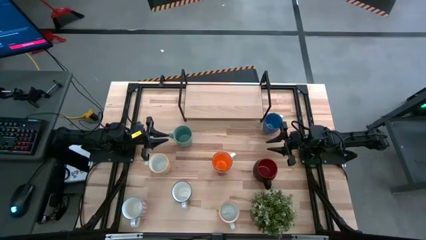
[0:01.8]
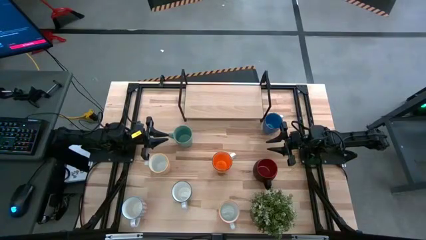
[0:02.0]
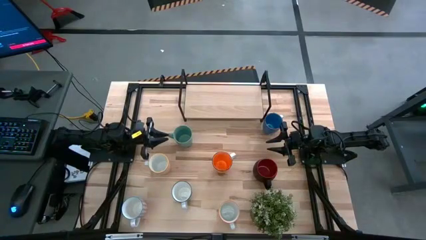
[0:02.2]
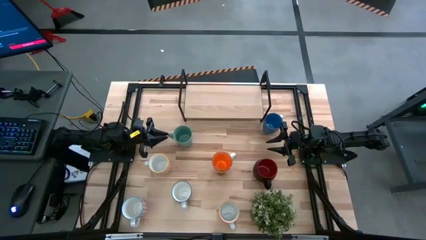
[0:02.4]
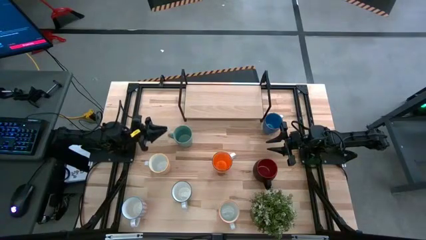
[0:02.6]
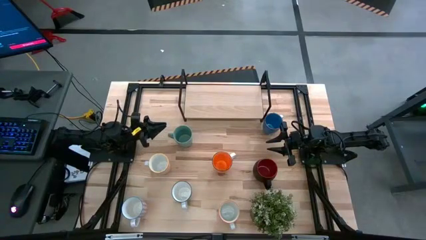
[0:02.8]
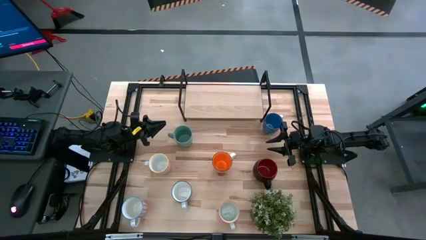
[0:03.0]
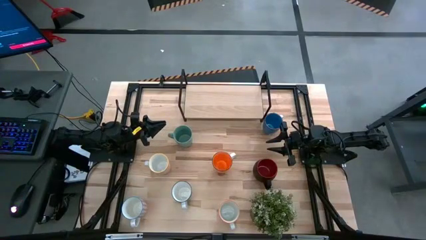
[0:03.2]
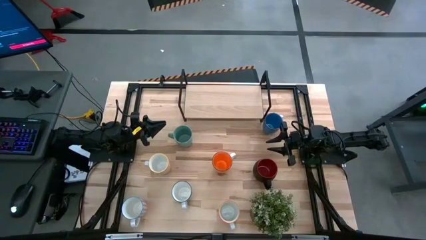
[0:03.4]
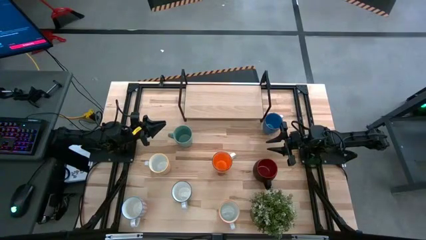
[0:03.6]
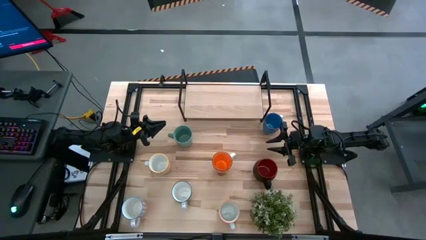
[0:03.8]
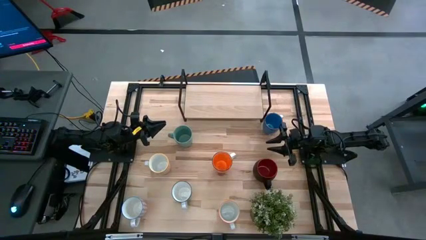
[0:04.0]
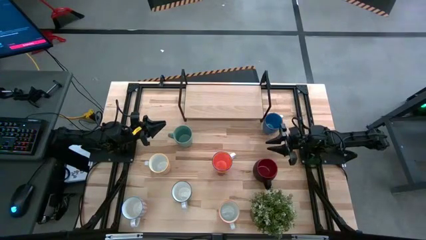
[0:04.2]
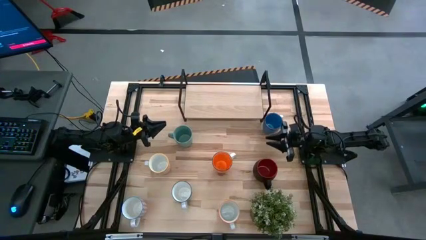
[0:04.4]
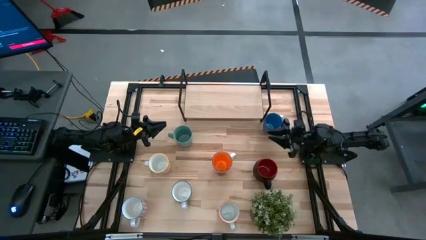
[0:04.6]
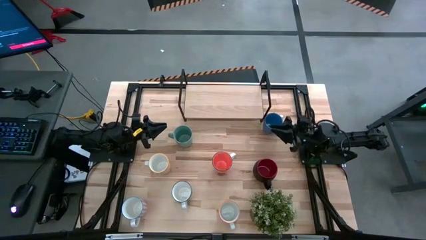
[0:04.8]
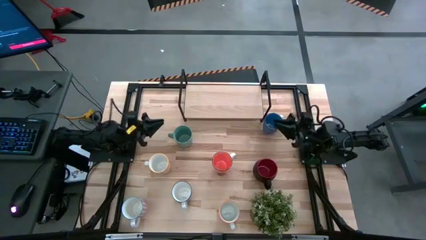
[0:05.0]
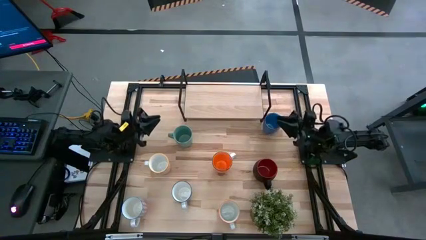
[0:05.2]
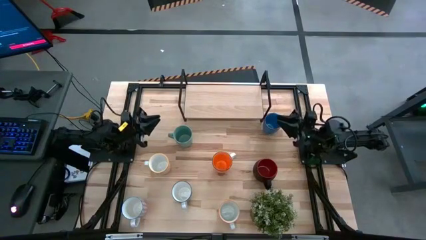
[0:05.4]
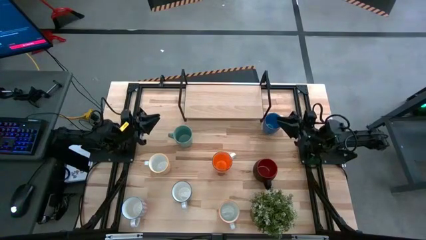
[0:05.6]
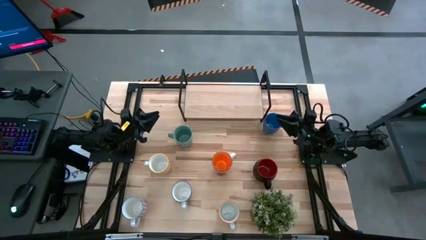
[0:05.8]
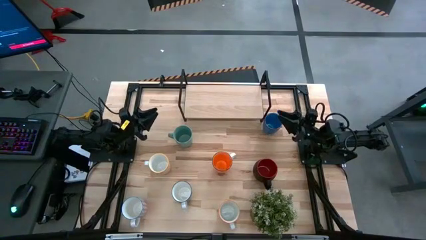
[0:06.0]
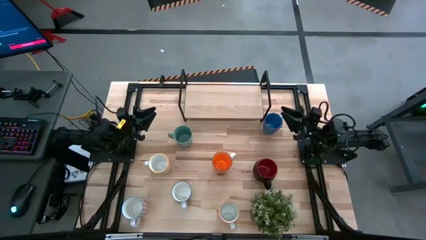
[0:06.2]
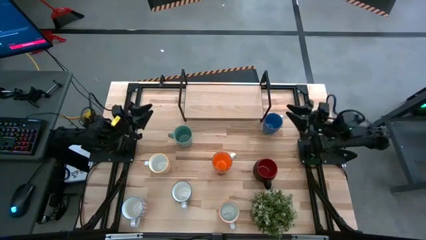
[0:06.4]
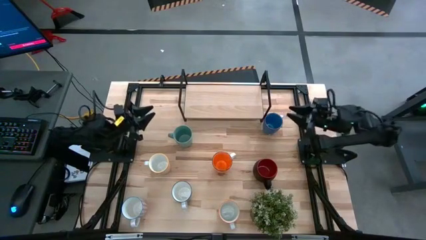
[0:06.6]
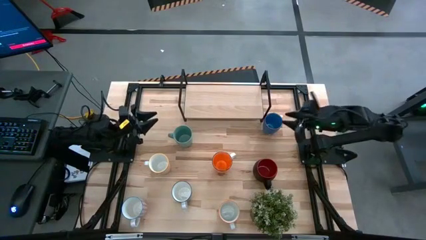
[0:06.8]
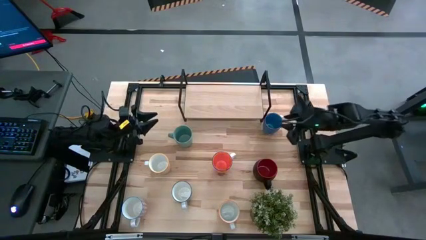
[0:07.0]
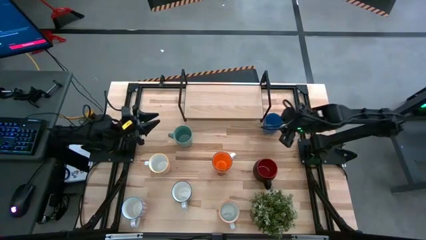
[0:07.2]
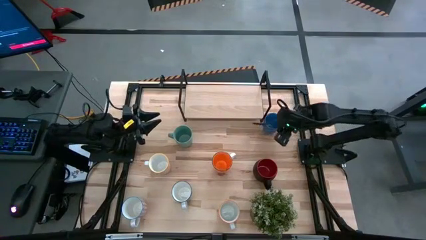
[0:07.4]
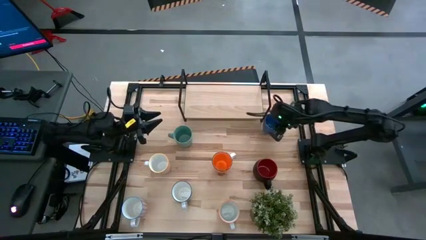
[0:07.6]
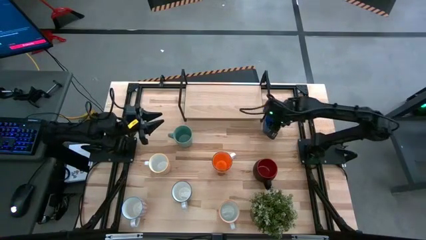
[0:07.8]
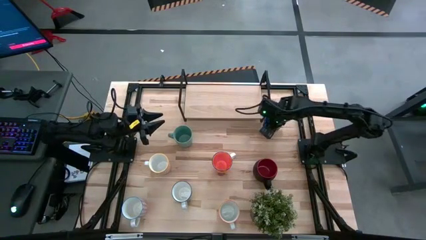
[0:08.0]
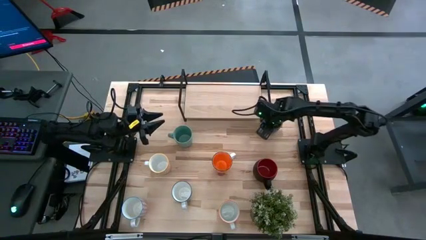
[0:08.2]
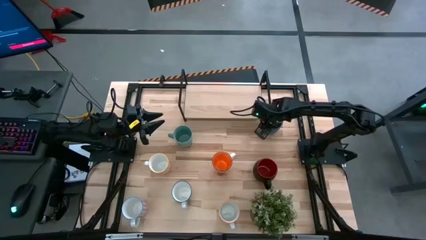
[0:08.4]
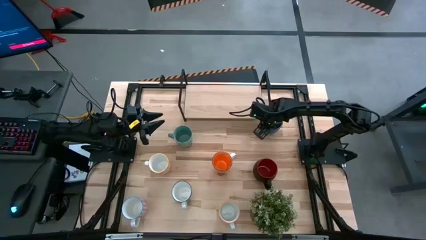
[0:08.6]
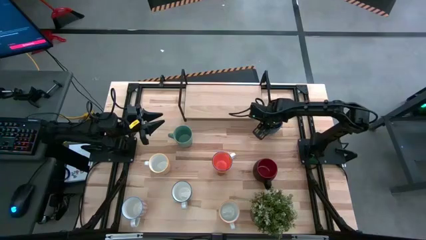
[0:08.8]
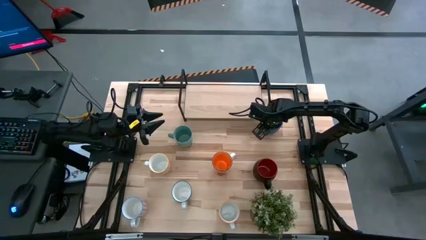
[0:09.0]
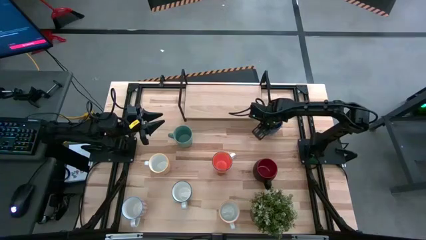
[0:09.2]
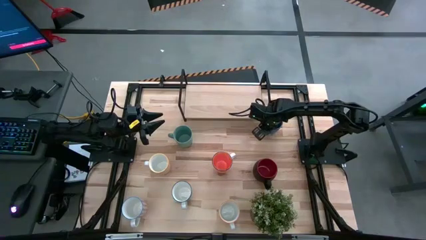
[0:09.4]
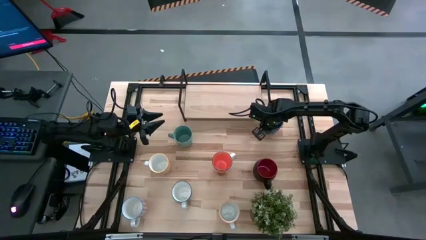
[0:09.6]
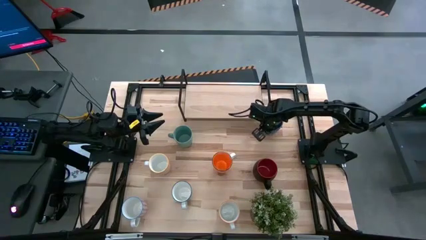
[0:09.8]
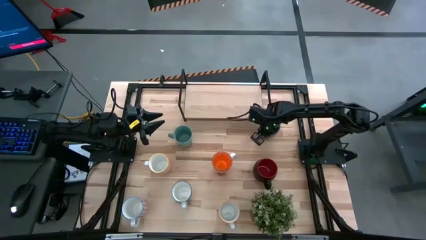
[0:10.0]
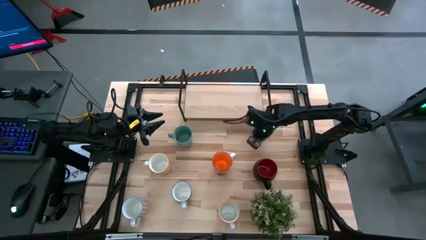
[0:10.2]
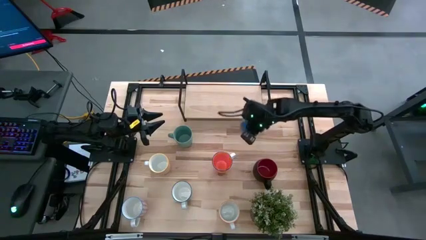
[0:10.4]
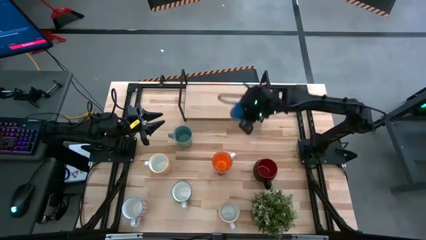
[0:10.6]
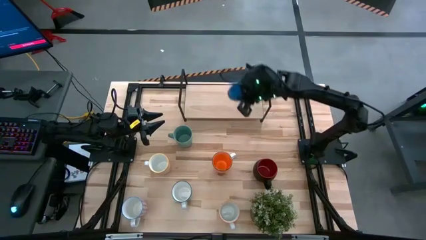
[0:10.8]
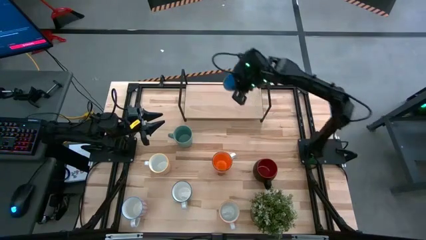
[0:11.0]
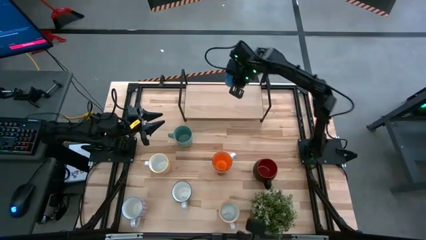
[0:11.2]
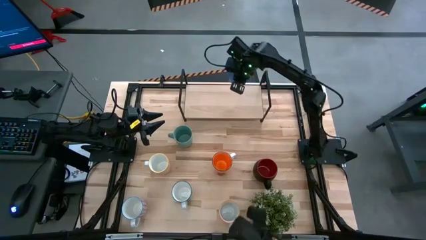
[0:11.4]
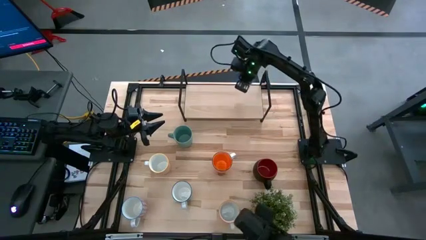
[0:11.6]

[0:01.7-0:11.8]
Task: Place coffee mugs
Put the blue mug on the shelf
